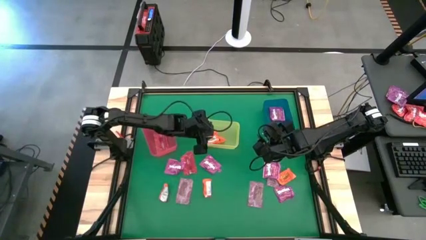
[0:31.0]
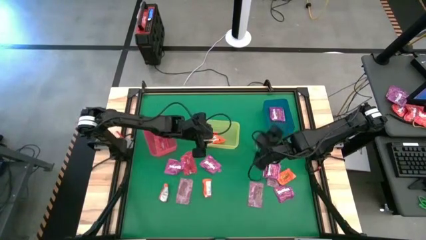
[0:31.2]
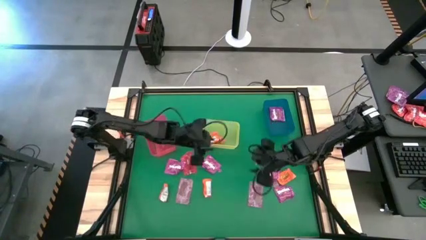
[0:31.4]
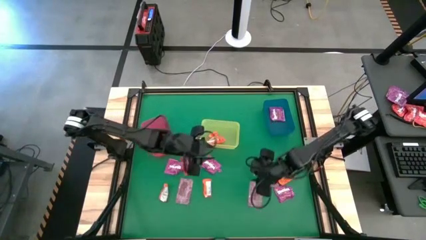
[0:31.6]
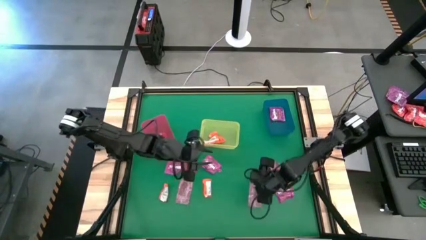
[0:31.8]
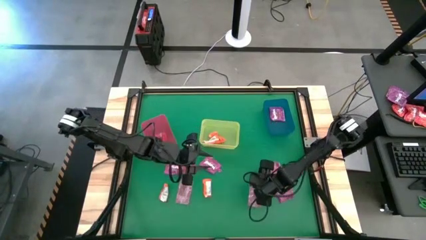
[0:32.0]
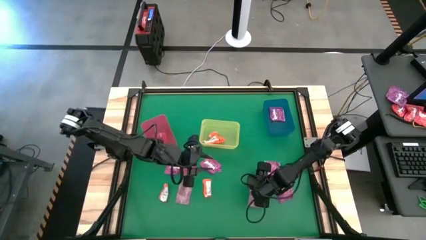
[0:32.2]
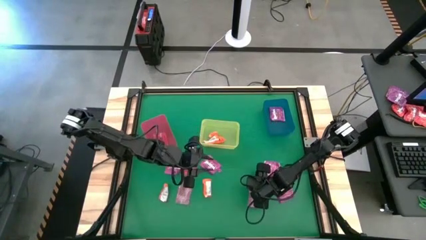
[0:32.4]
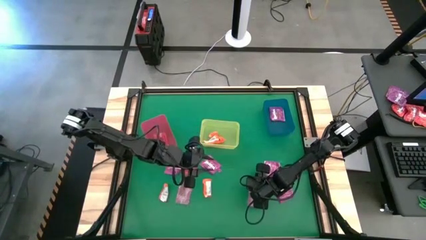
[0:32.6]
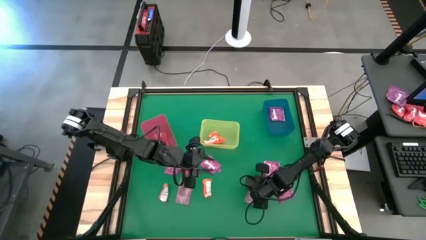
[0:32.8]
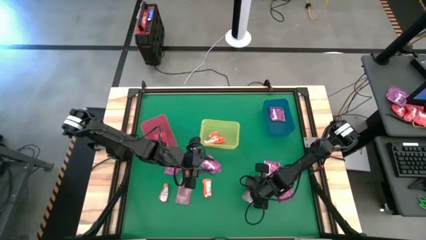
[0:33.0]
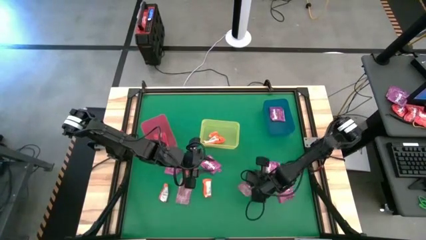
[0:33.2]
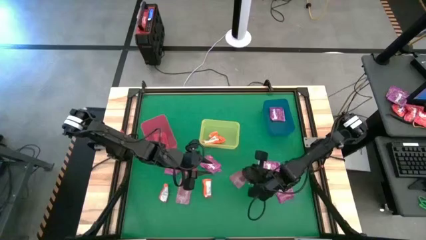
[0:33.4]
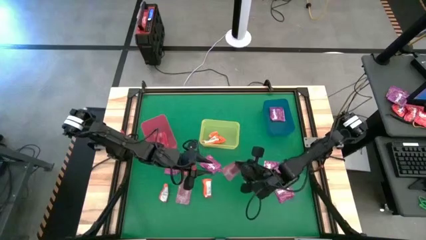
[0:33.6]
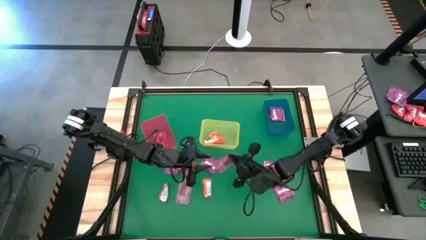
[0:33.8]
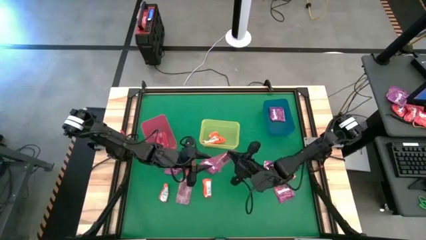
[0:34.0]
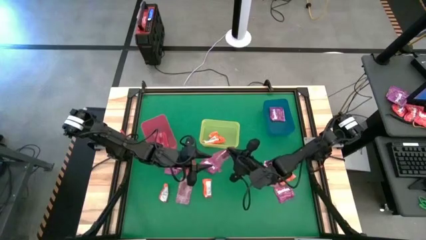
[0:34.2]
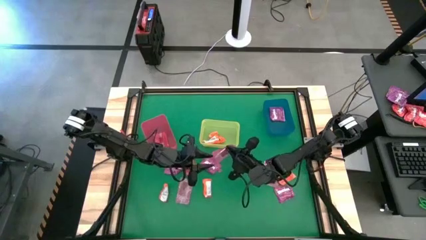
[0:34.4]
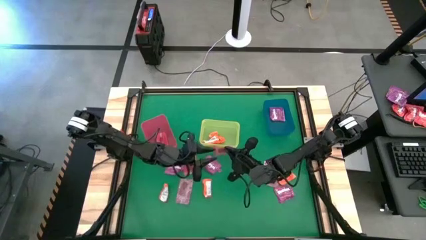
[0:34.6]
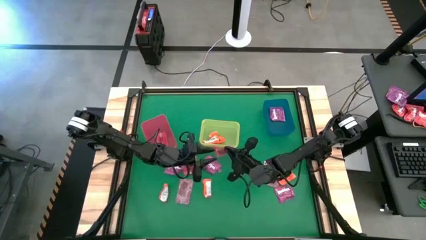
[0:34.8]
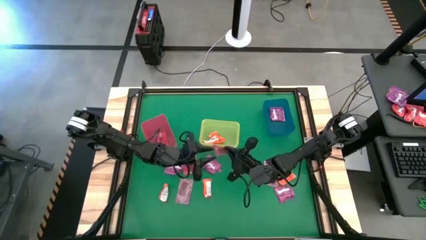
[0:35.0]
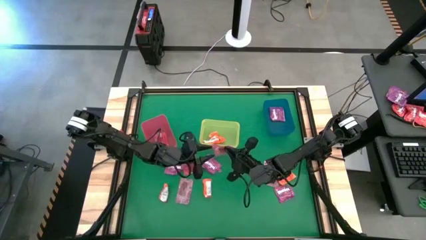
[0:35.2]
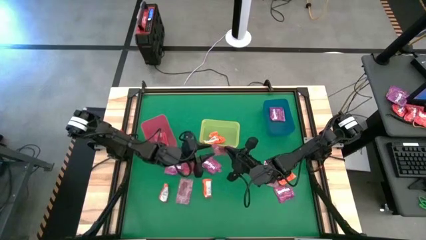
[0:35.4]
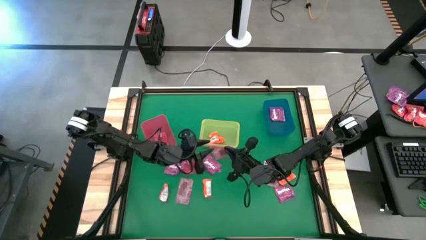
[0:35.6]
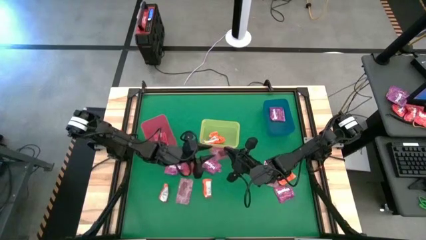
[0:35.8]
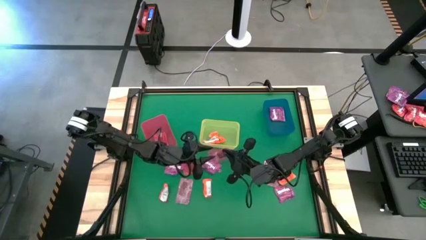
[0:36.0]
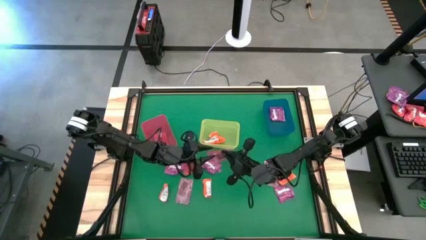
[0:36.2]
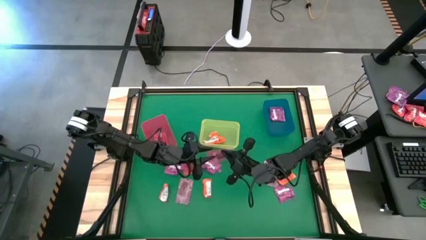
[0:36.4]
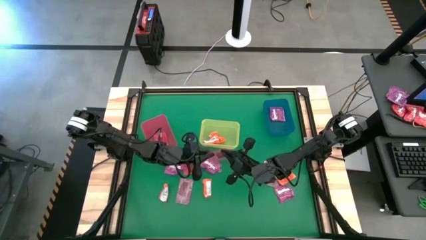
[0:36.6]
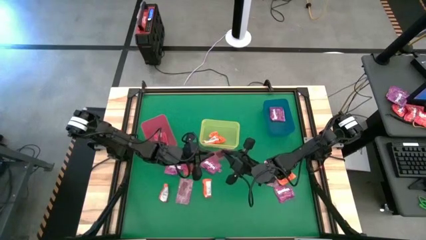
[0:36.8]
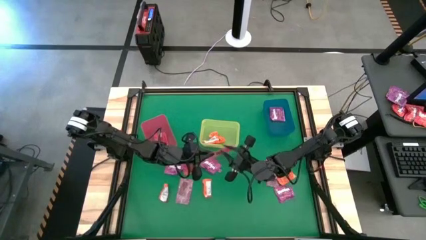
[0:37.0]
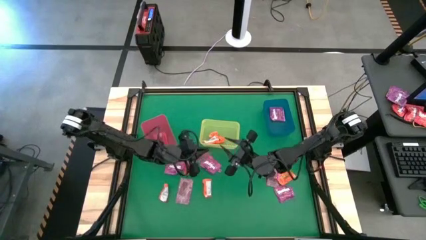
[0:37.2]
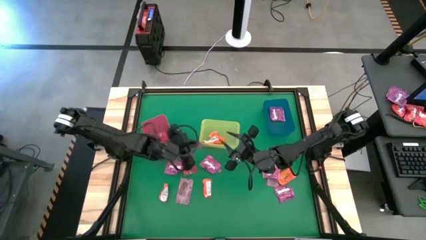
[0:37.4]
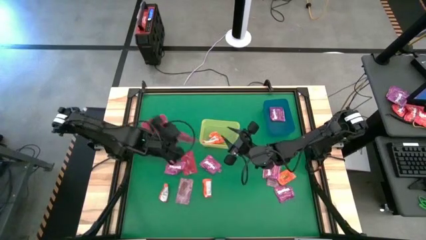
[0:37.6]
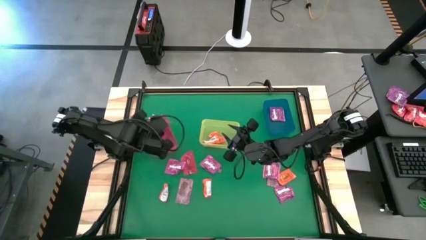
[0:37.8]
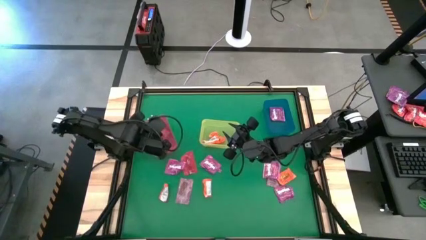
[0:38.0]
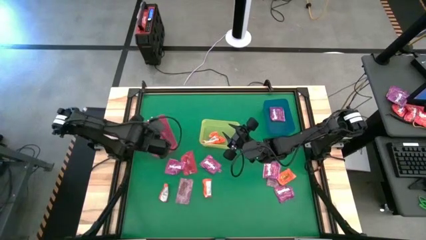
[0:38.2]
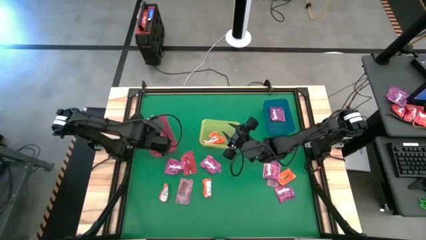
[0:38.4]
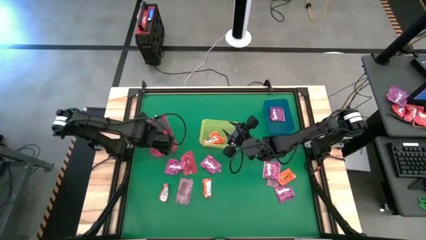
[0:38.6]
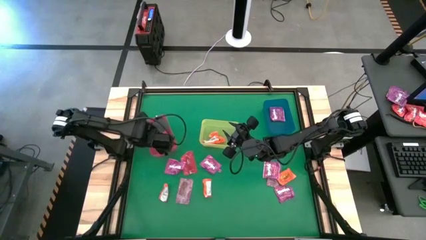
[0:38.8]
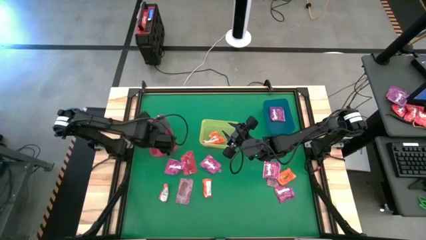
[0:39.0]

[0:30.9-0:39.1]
Task: Sort candy by brand, put in halloween buckets
Put the red candy into the red bin

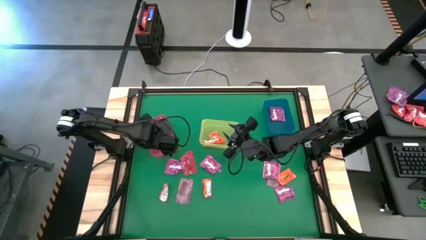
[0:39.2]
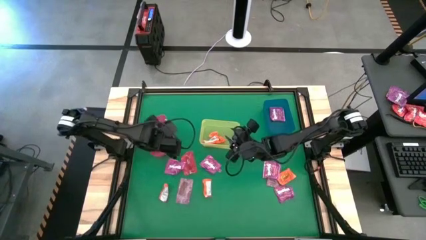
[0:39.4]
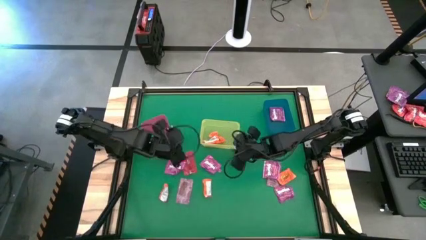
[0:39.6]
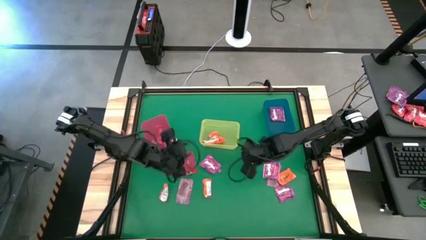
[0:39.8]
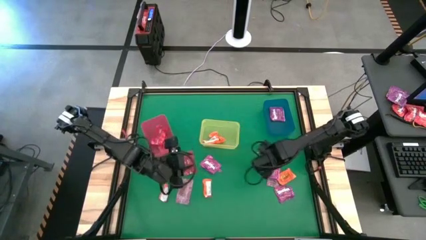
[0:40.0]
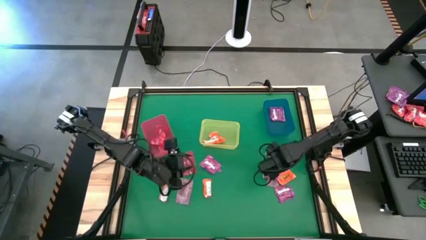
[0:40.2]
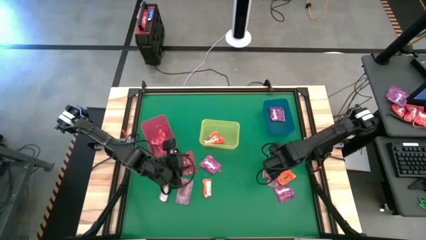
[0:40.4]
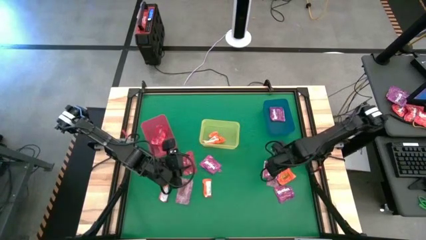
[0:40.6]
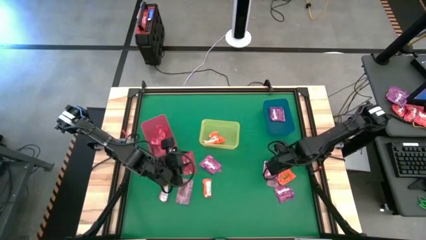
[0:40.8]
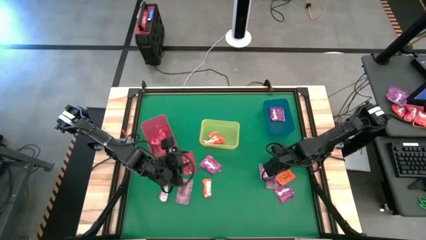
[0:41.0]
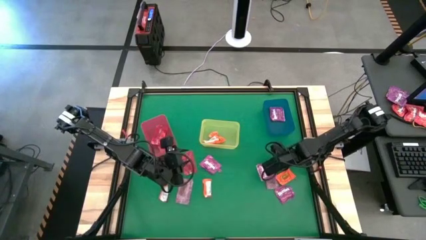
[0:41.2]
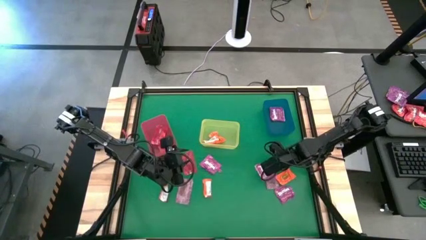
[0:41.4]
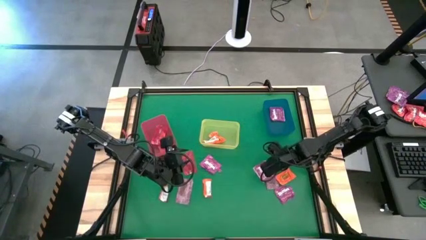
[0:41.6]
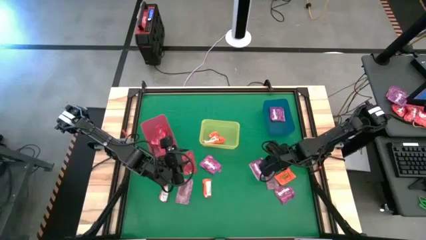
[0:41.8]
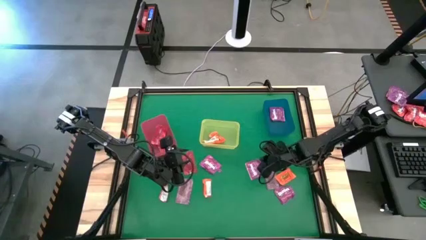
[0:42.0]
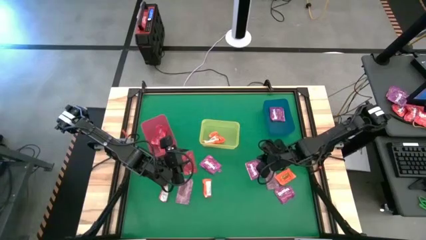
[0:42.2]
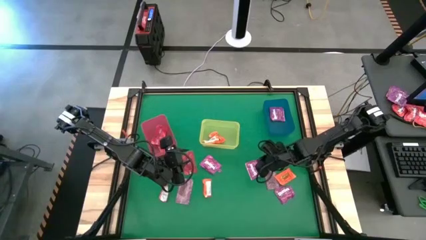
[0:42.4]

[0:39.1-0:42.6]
Put the purple candy into the blue bin

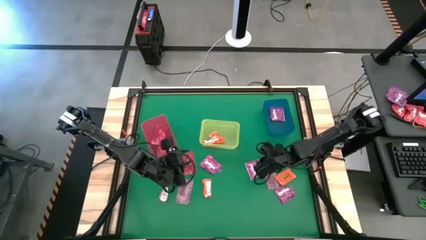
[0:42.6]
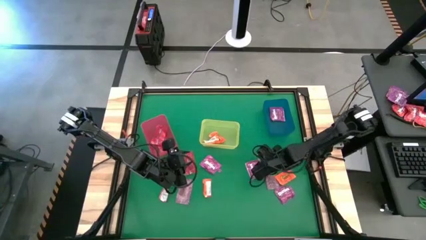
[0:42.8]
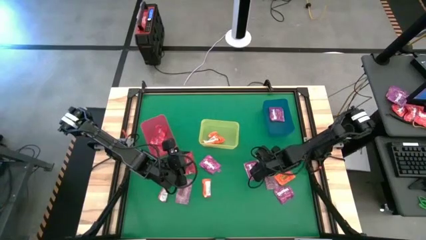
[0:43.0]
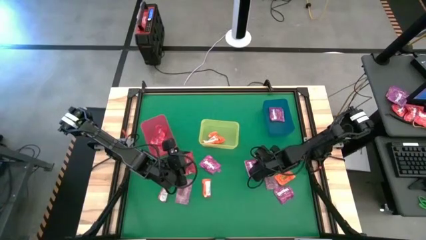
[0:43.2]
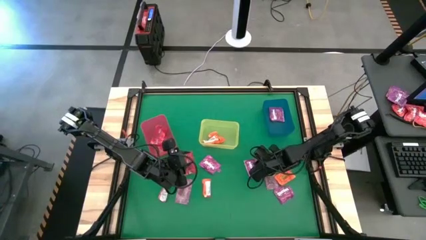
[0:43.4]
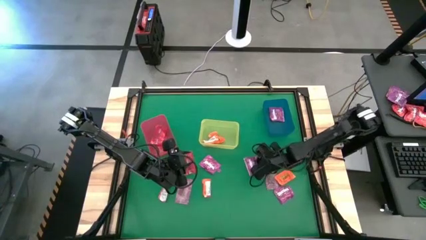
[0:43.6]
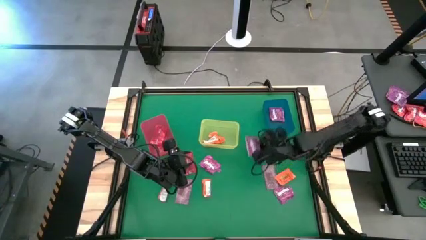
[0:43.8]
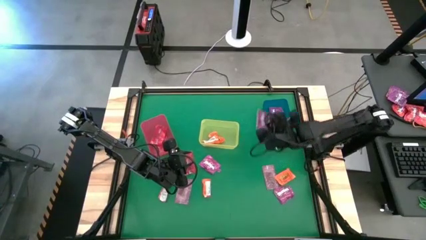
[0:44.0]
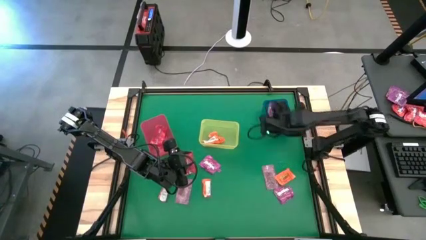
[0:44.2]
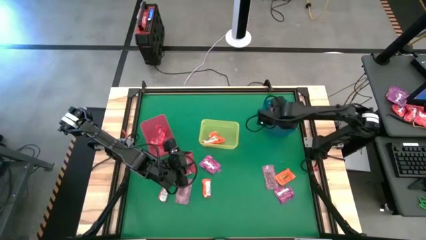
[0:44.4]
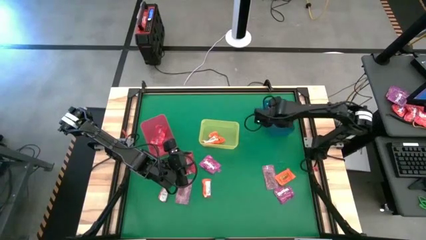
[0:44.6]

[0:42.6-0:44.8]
Put the purple candy into the blue bin

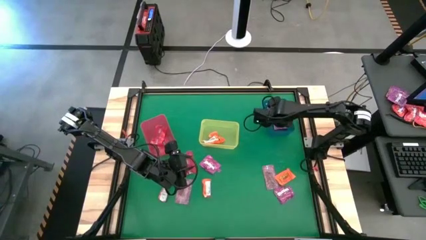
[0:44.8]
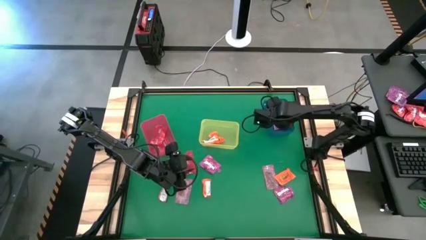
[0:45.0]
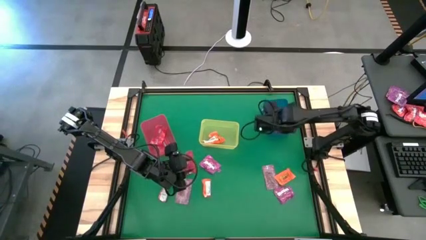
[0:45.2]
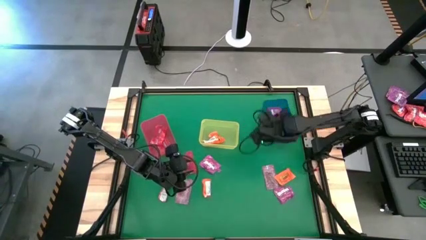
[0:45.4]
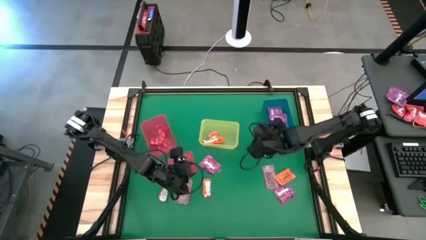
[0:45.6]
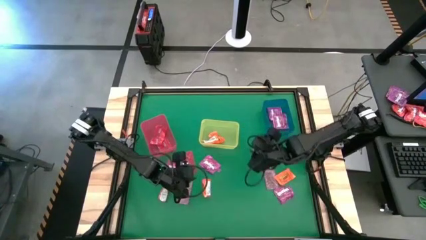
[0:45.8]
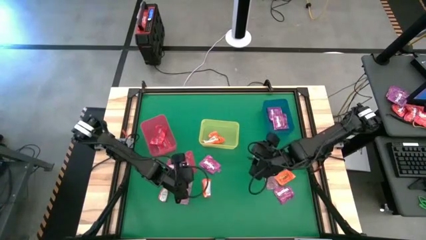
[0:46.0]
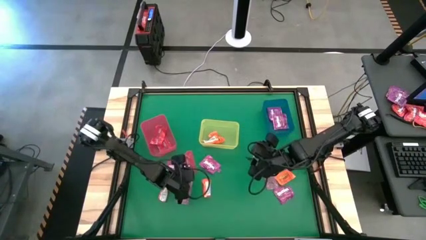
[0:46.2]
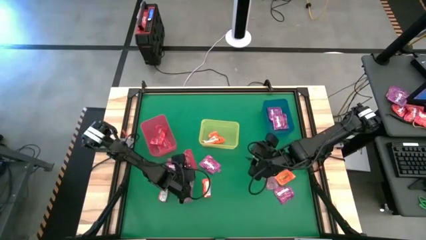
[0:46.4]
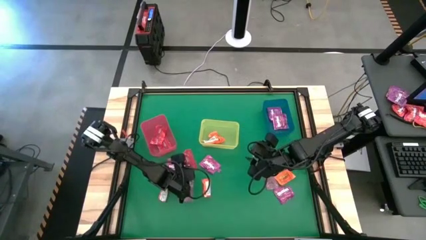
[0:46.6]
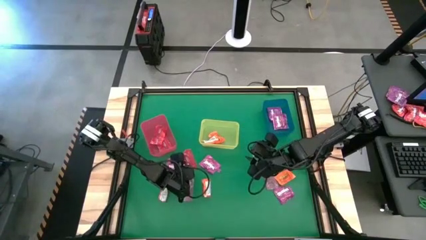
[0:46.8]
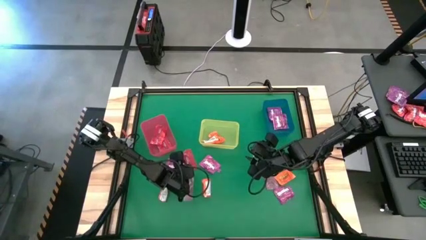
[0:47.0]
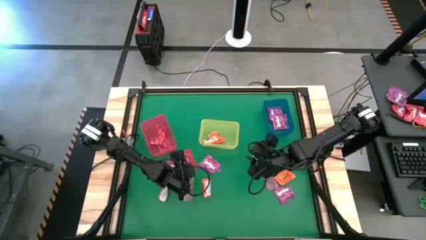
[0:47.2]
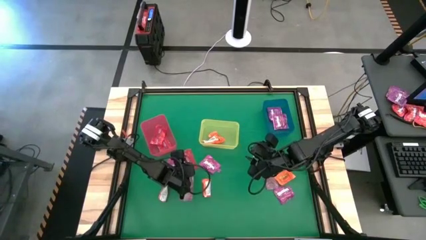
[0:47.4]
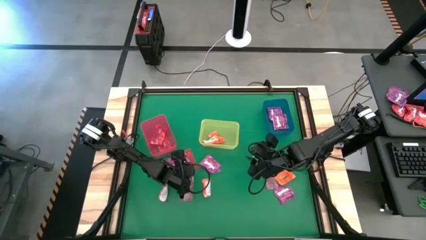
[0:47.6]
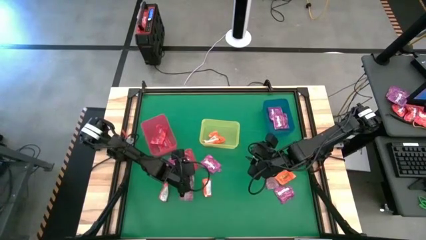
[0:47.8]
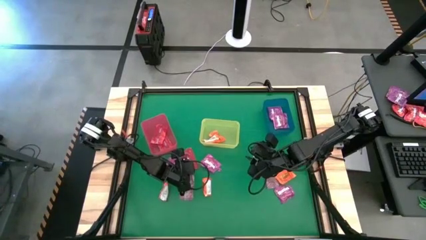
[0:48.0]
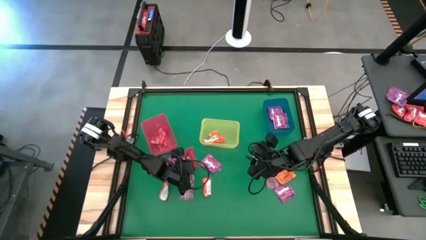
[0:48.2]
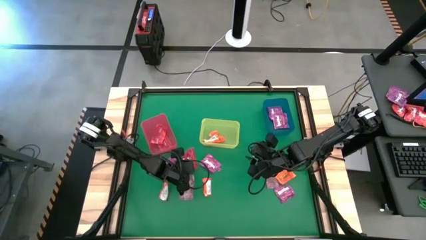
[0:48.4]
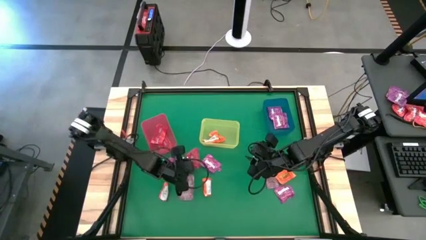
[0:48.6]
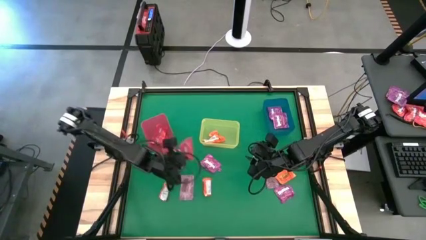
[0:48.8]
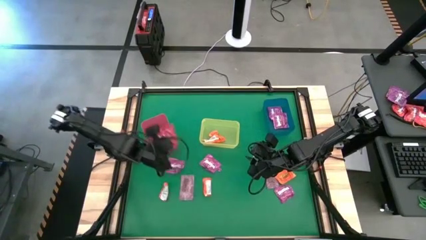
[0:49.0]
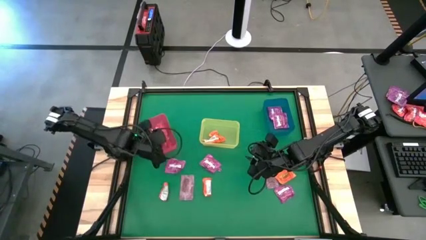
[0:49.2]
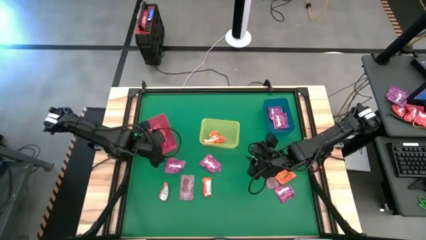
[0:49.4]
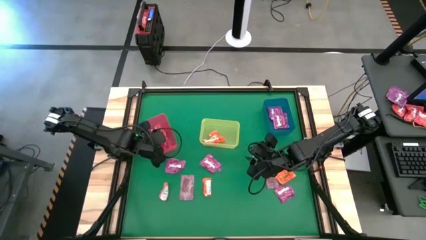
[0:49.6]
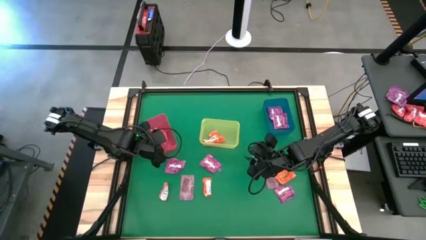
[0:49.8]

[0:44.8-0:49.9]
Put the red candy into the red bin
